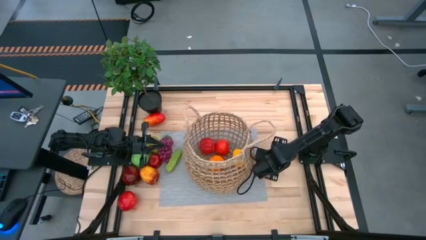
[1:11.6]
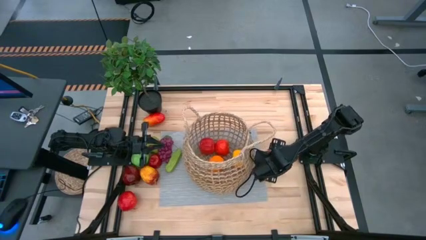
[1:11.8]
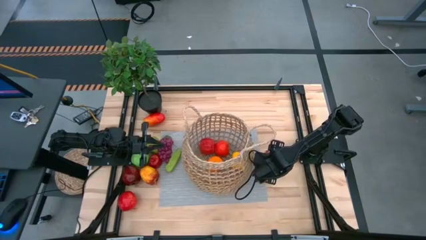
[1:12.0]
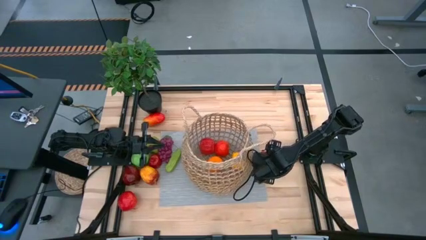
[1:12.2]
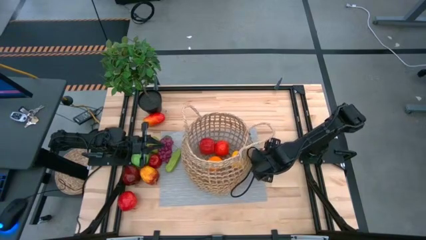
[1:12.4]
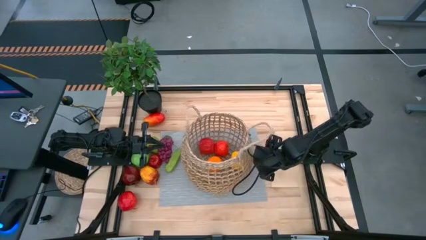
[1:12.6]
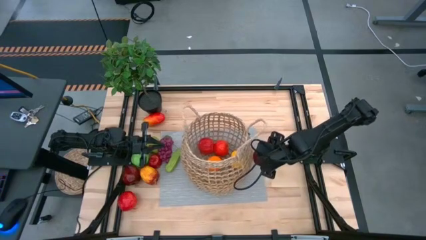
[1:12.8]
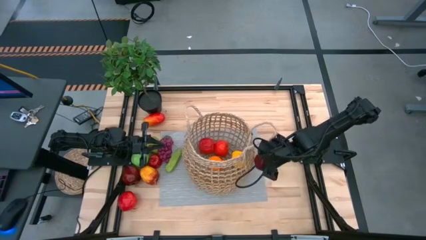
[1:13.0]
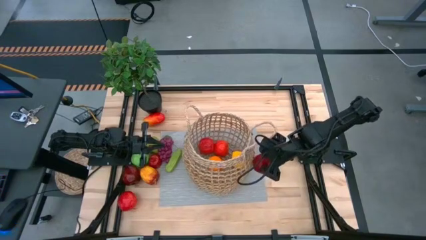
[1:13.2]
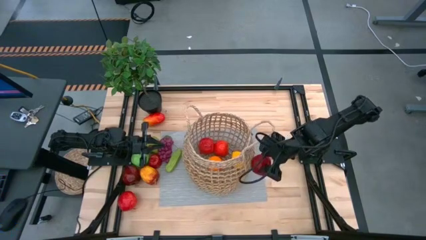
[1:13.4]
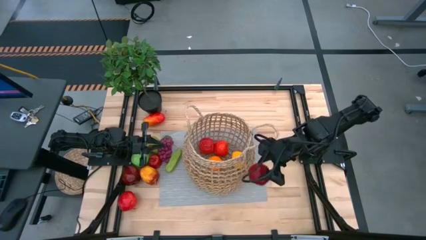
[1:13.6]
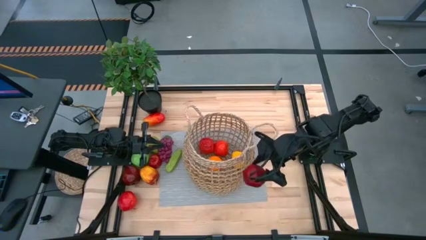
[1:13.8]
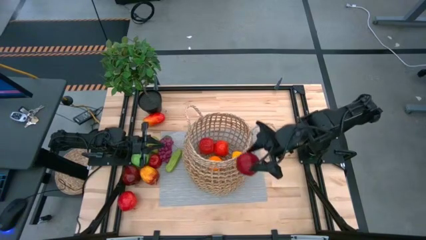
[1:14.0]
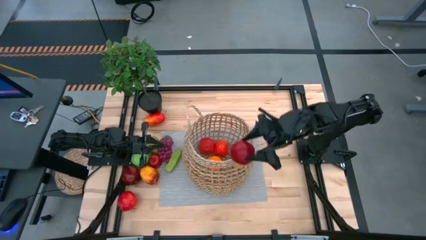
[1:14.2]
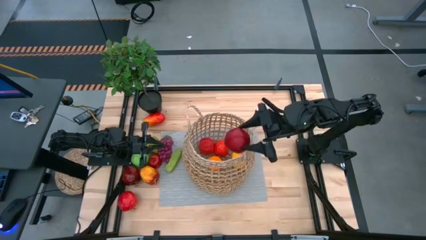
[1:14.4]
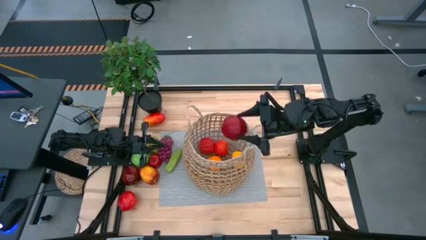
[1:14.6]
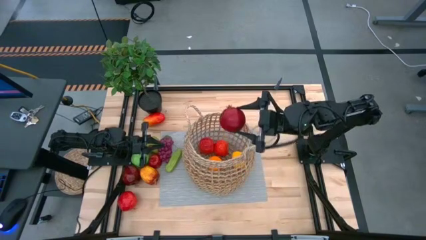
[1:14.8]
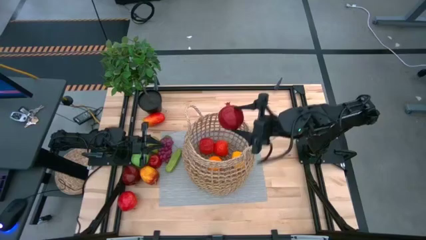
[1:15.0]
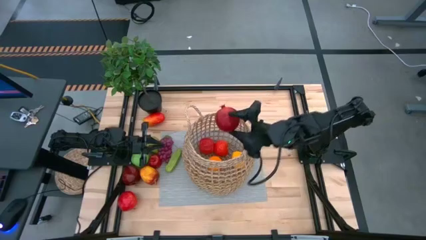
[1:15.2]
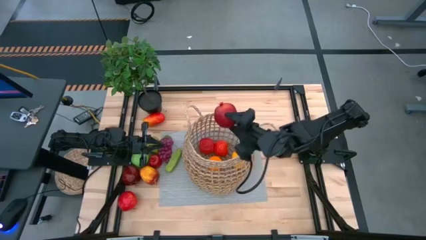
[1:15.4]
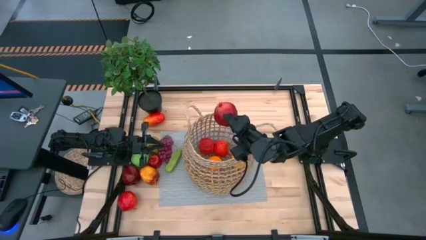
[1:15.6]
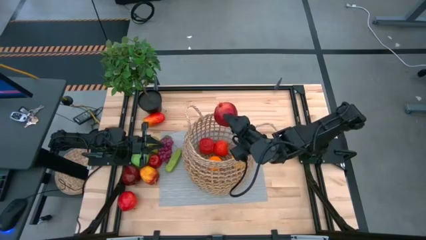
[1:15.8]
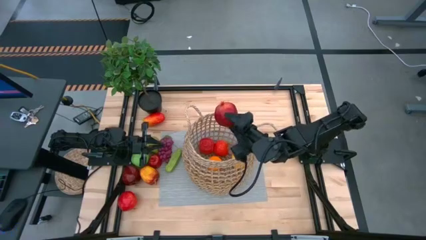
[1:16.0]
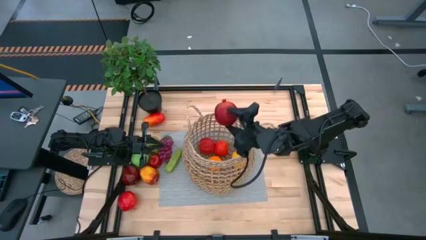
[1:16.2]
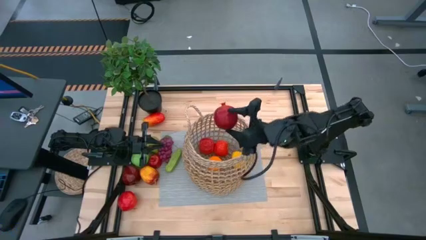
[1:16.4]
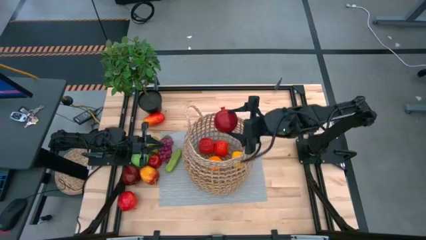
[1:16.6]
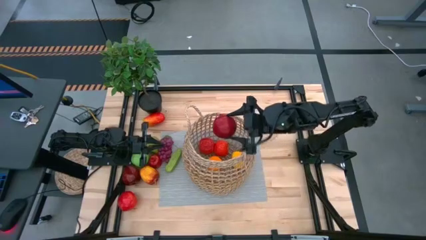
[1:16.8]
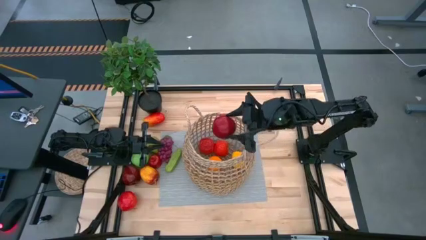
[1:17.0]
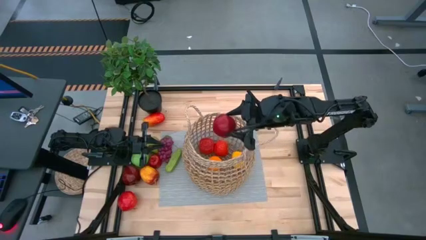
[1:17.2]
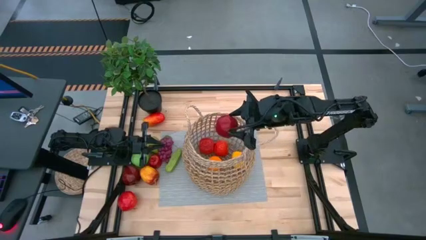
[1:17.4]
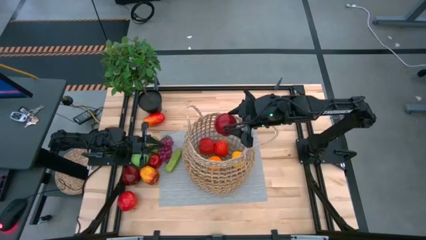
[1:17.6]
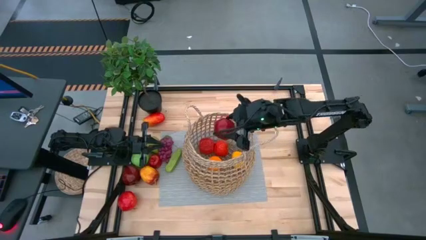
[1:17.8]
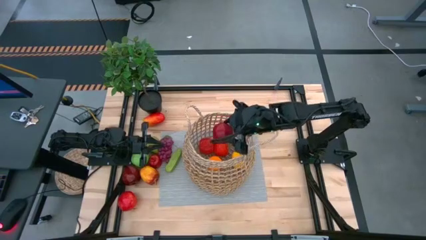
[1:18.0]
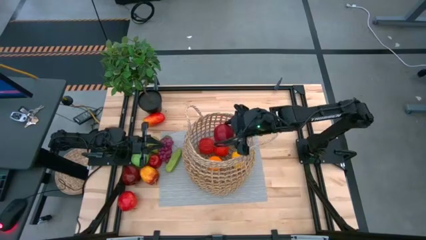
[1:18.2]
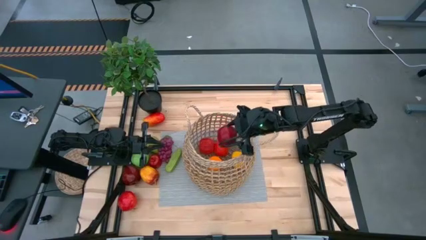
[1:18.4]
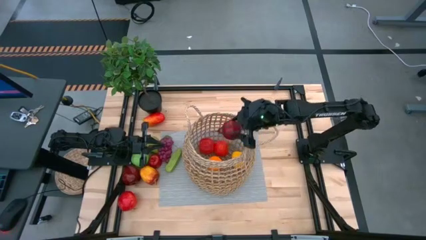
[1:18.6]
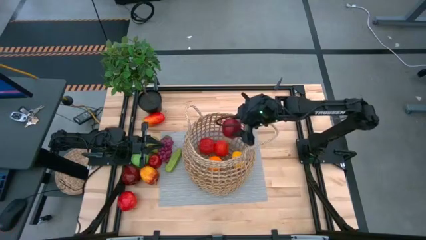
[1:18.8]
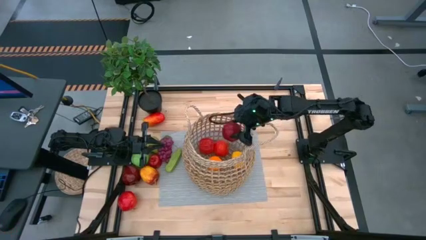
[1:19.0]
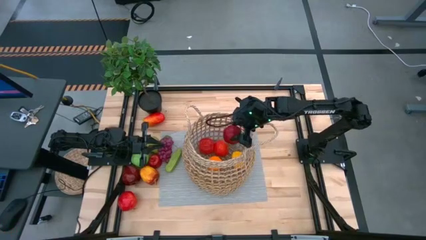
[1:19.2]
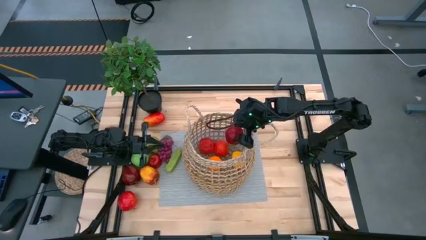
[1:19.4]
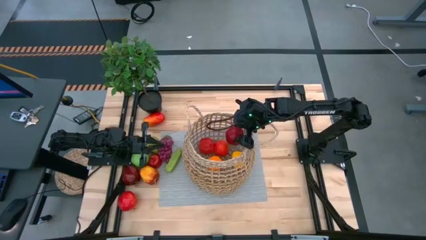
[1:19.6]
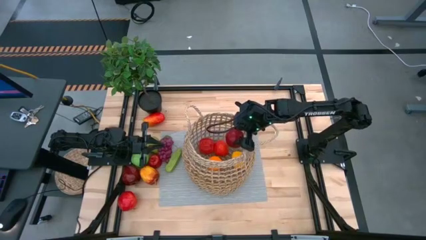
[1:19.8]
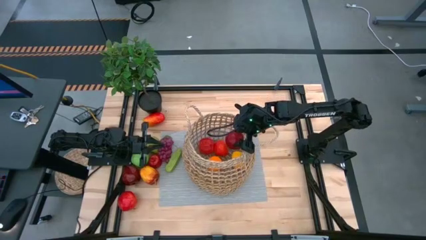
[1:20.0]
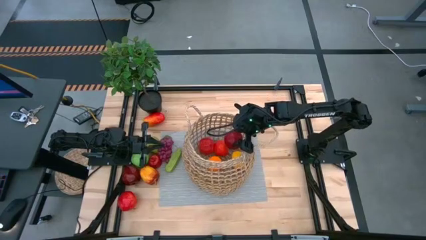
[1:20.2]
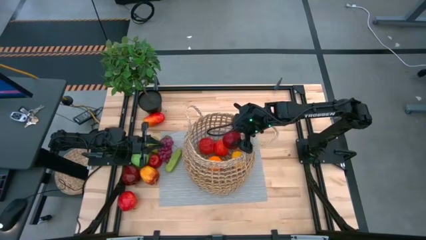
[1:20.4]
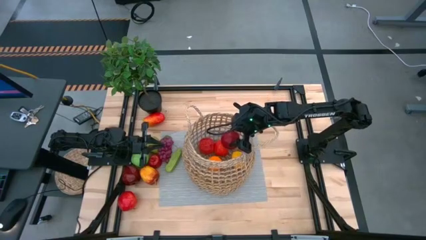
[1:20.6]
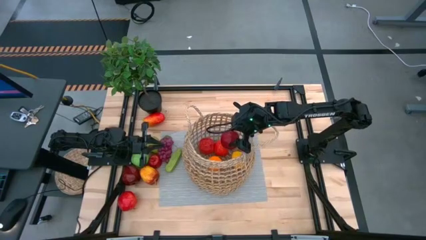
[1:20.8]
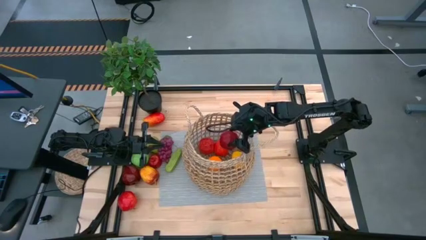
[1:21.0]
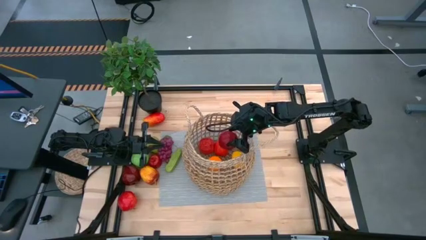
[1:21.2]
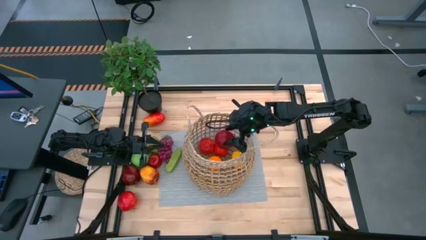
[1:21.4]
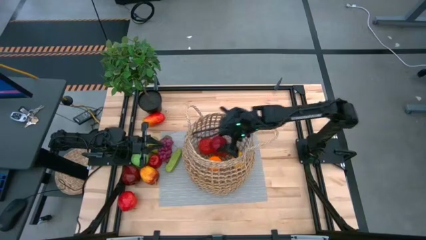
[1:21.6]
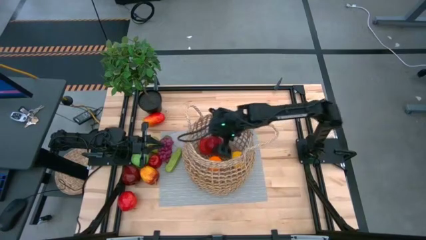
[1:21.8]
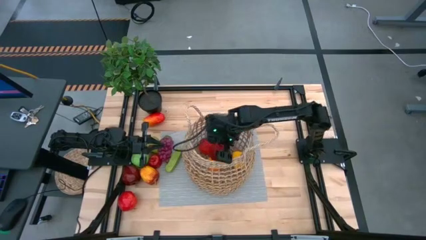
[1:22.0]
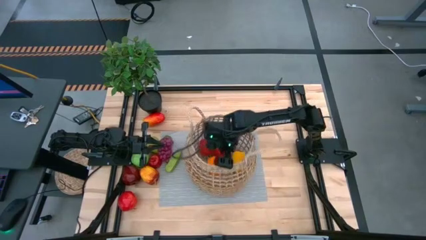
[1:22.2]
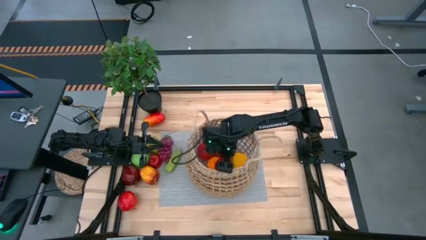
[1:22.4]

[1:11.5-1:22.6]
Task: Build produce basket
Put the red pomegranate into the brown basket

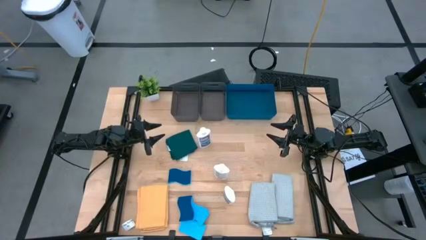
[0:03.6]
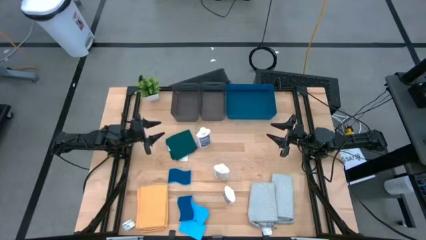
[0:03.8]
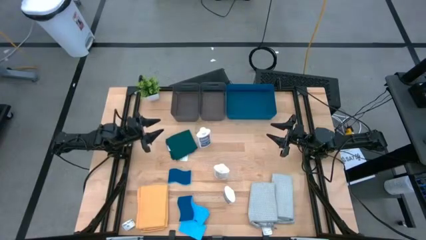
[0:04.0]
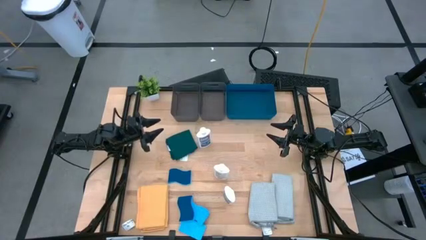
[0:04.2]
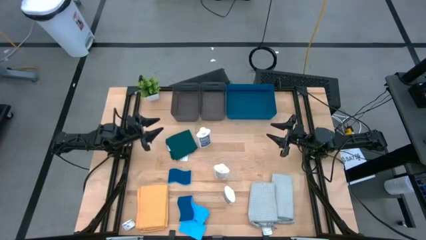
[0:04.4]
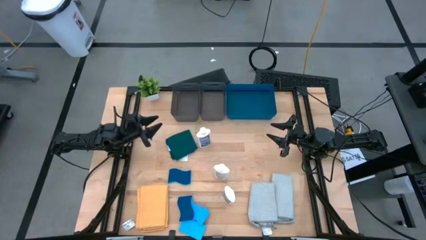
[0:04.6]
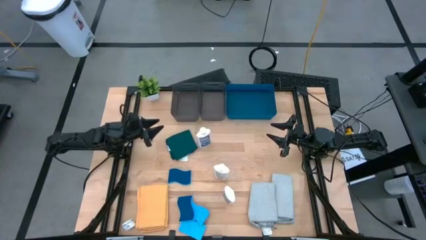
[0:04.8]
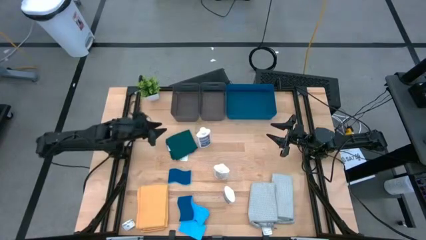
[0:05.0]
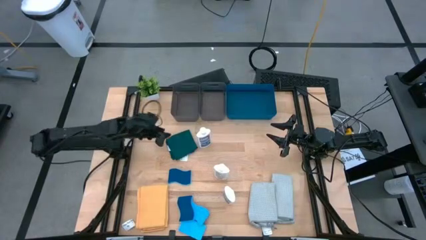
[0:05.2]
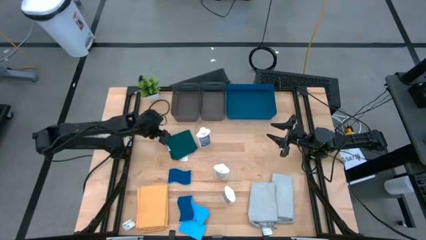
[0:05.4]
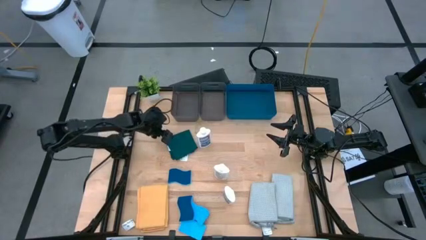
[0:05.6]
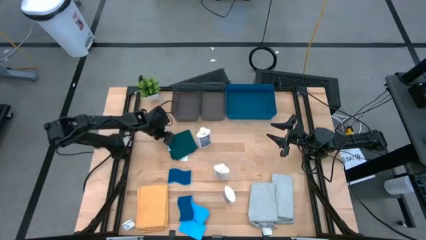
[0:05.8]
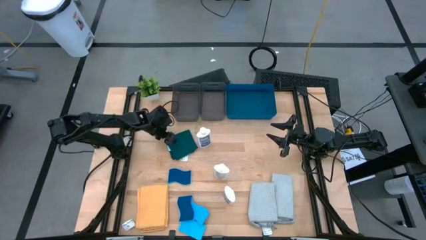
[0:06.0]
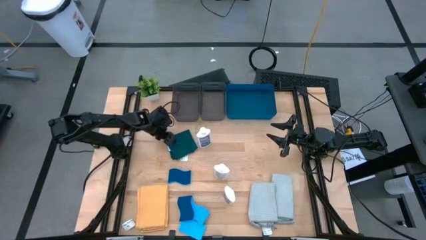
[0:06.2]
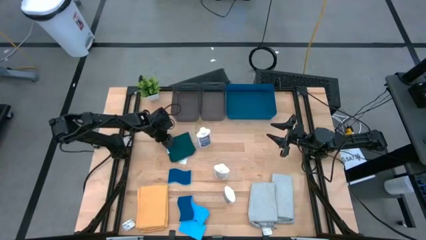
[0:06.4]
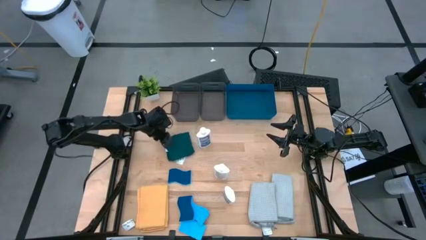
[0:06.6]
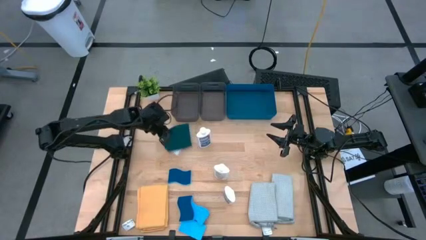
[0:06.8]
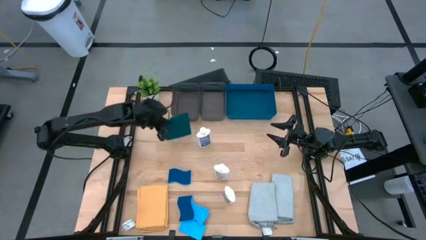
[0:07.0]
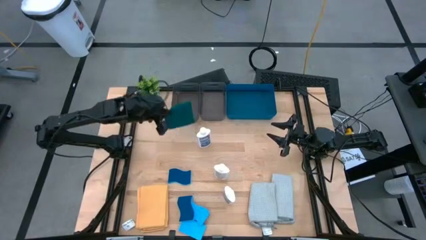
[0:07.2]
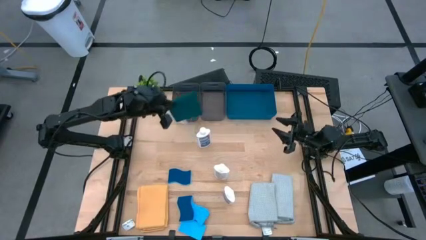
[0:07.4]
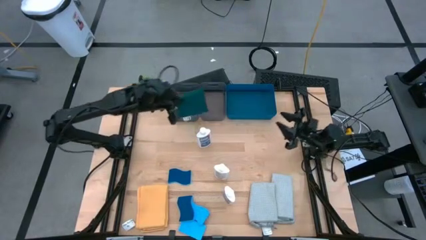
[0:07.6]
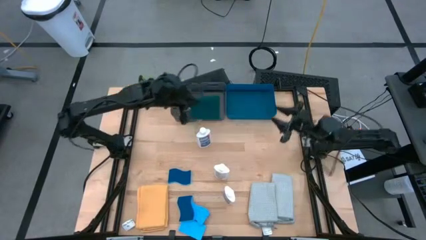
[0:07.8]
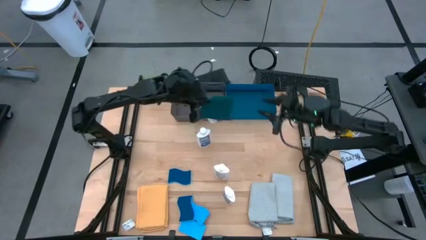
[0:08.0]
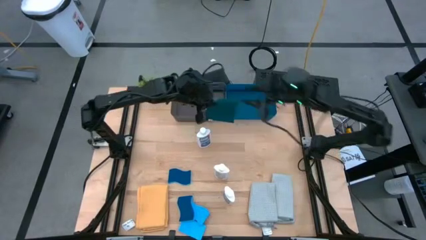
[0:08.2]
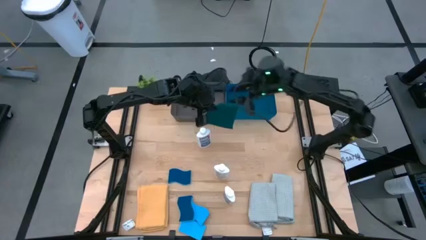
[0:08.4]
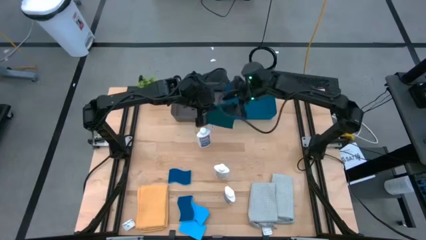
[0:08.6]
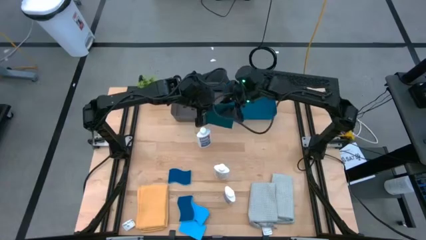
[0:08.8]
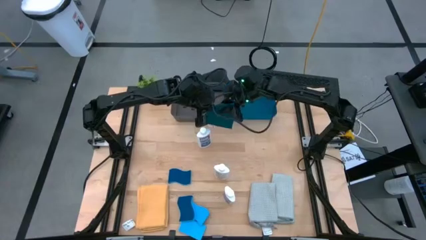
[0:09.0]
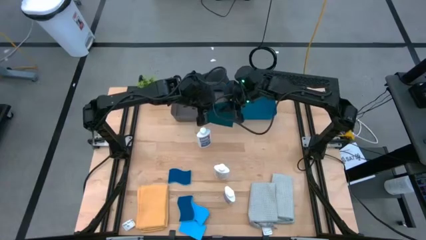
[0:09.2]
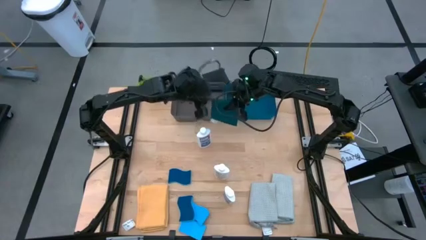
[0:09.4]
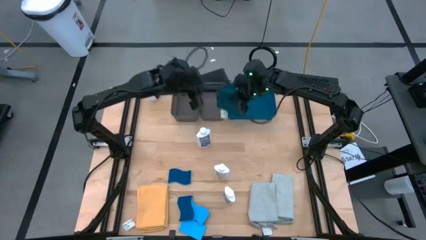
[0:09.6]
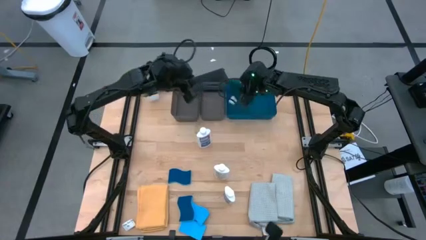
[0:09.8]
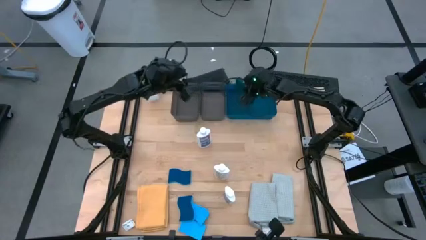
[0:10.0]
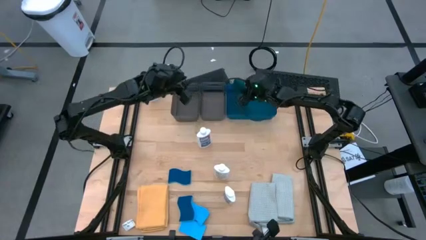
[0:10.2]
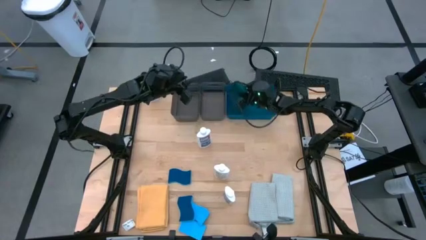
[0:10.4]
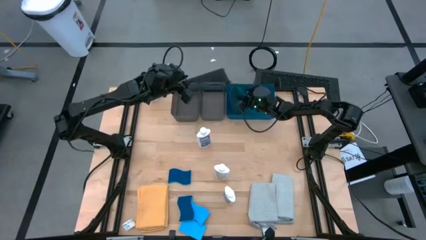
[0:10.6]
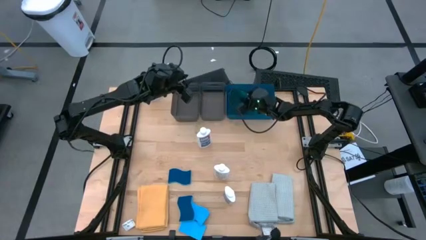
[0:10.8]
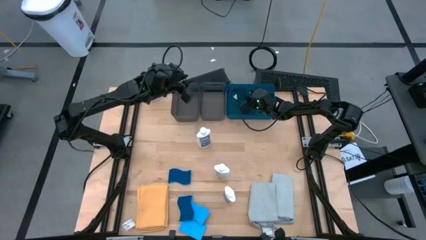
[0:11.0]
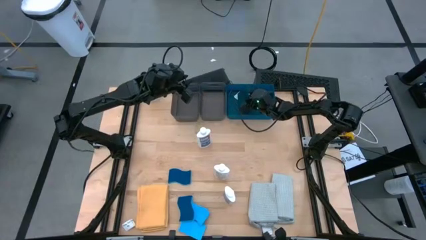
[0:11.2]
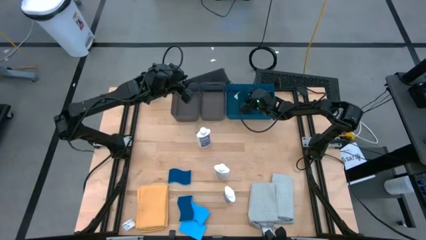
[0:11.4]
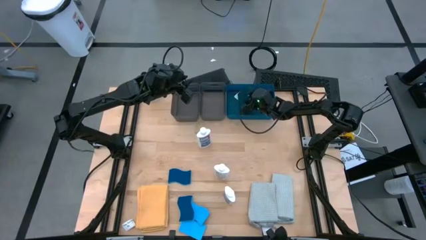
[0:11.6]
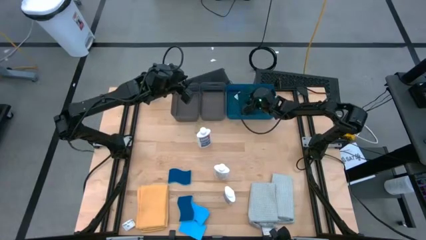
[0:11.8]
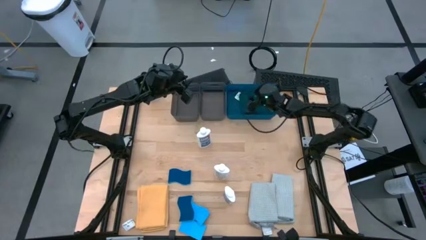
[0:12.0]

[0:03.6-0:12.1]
Task: Pick & Place Kitchen Items
Put the green towel into the blue bin
